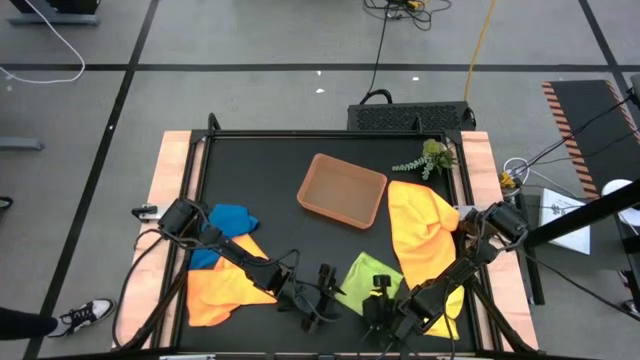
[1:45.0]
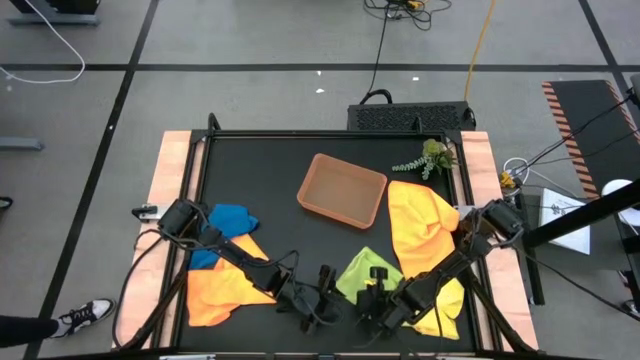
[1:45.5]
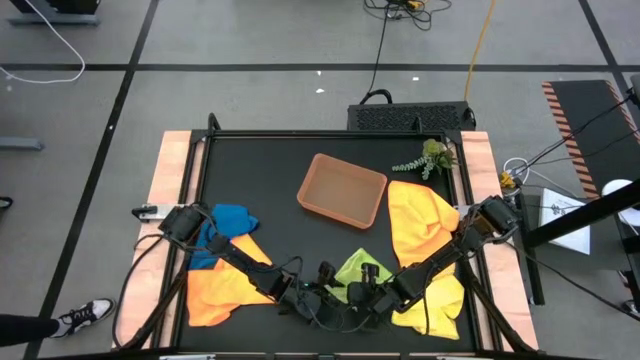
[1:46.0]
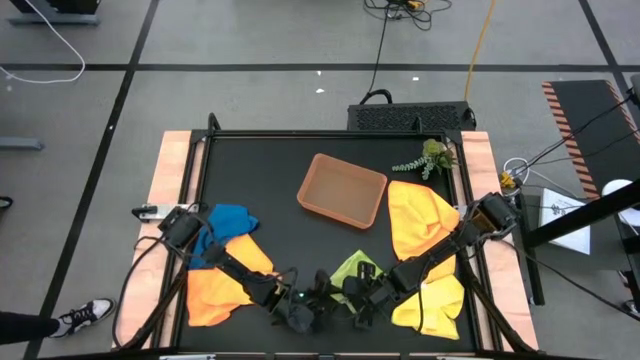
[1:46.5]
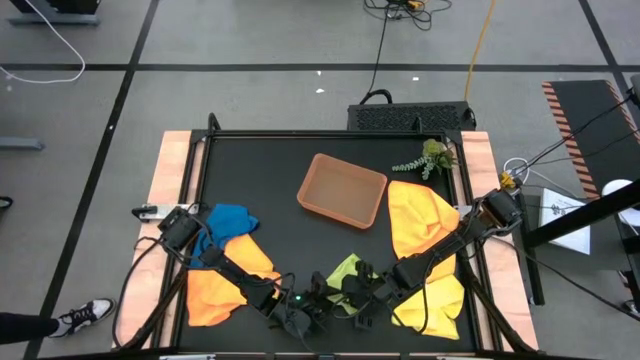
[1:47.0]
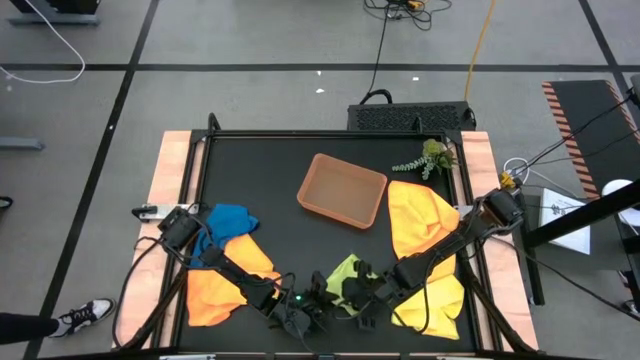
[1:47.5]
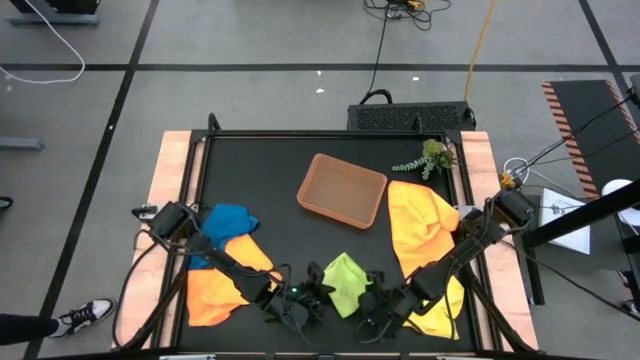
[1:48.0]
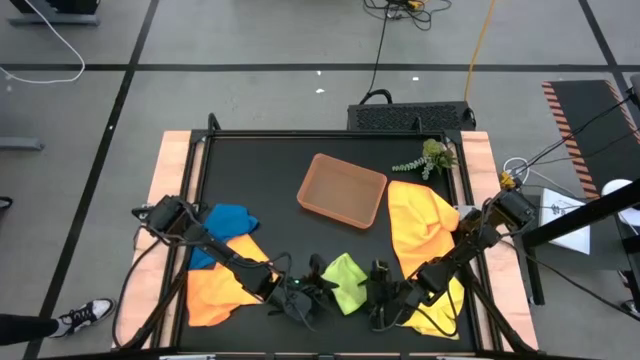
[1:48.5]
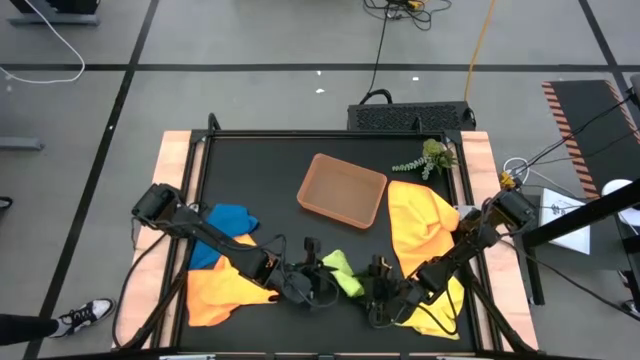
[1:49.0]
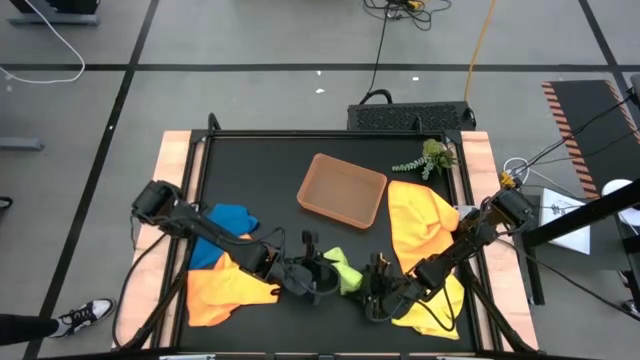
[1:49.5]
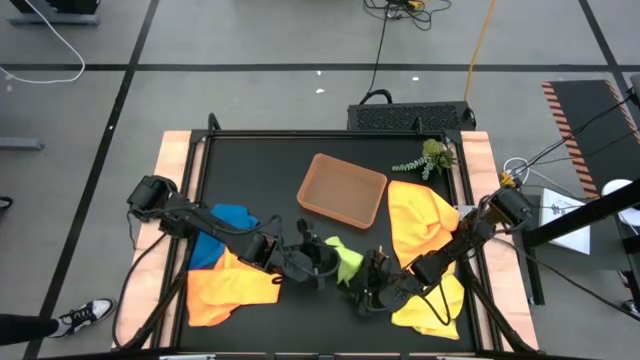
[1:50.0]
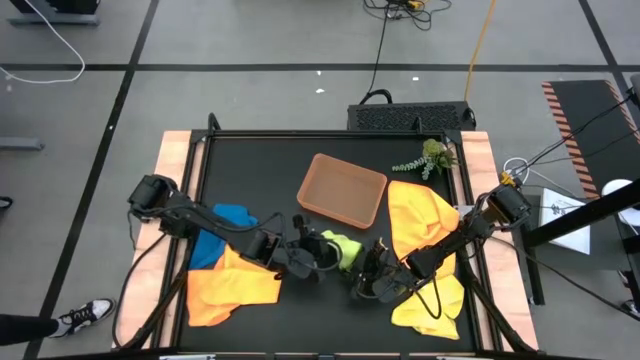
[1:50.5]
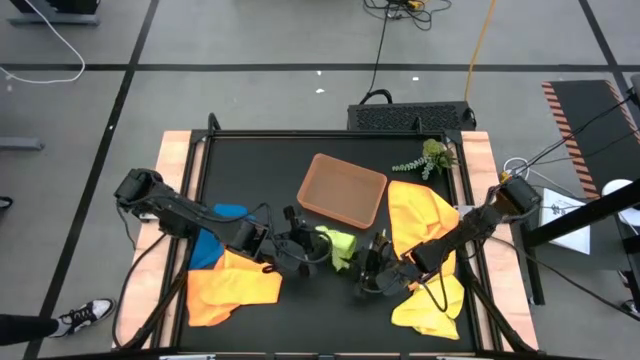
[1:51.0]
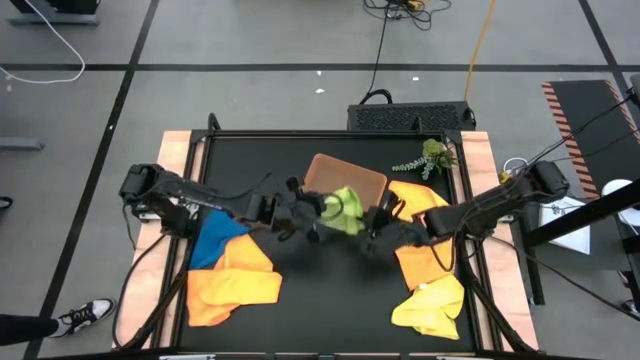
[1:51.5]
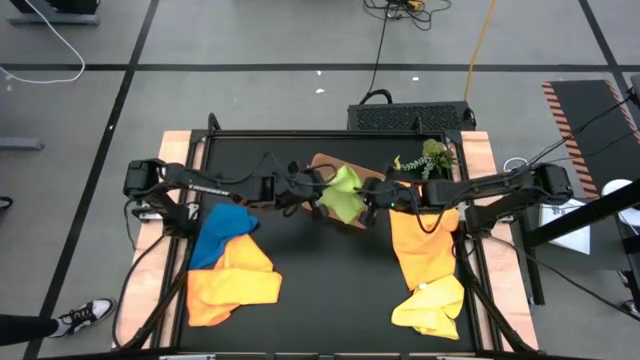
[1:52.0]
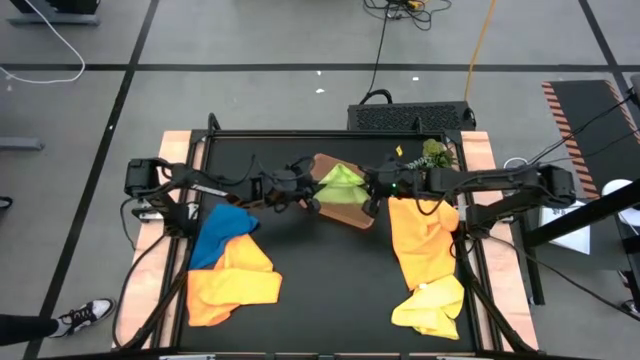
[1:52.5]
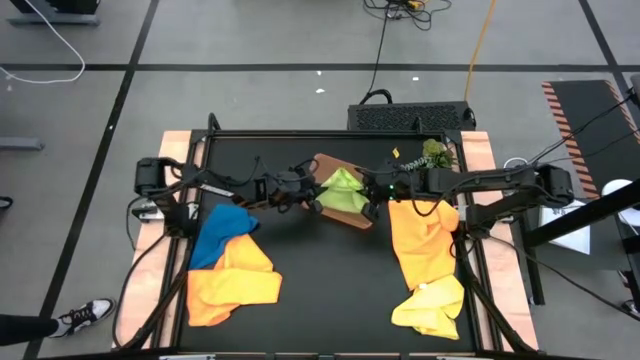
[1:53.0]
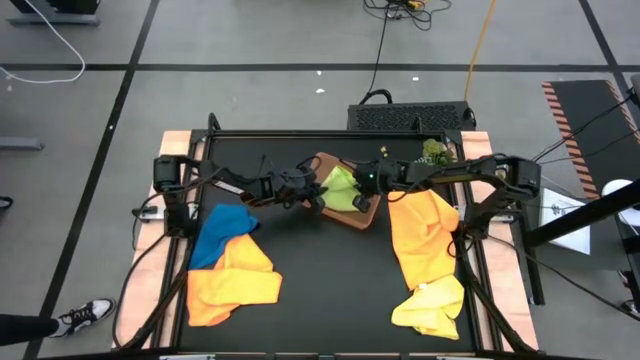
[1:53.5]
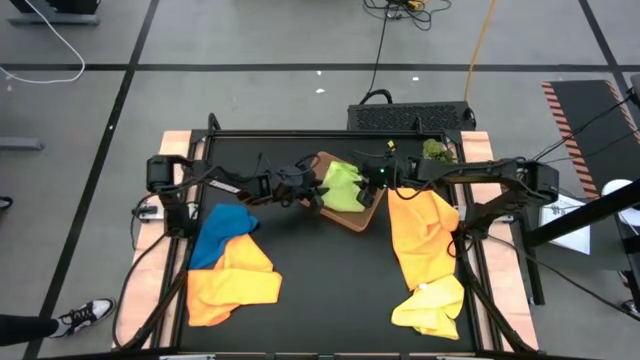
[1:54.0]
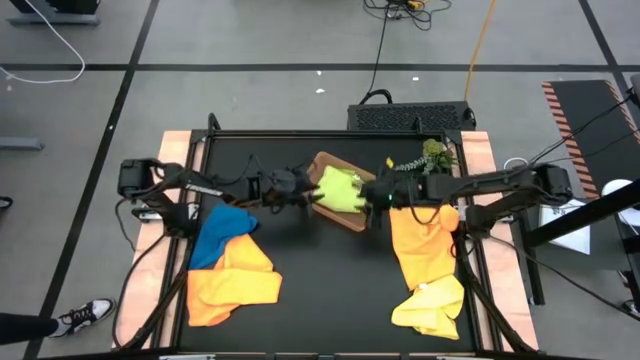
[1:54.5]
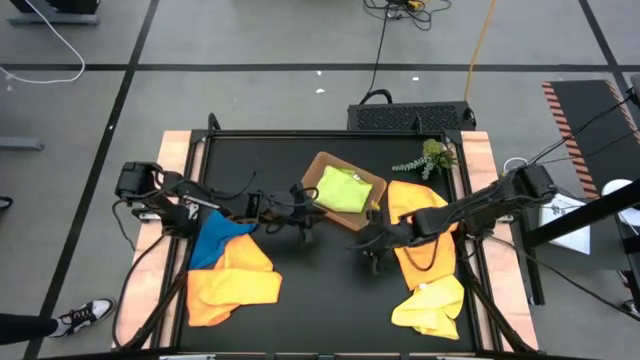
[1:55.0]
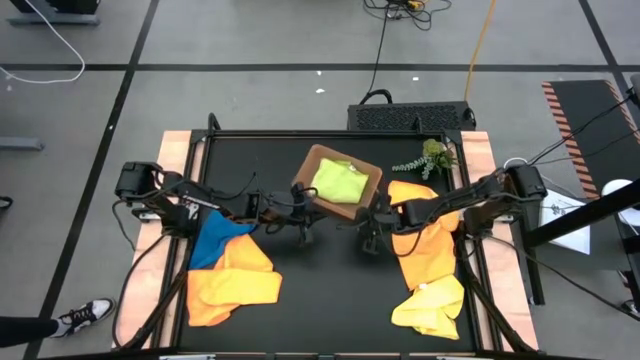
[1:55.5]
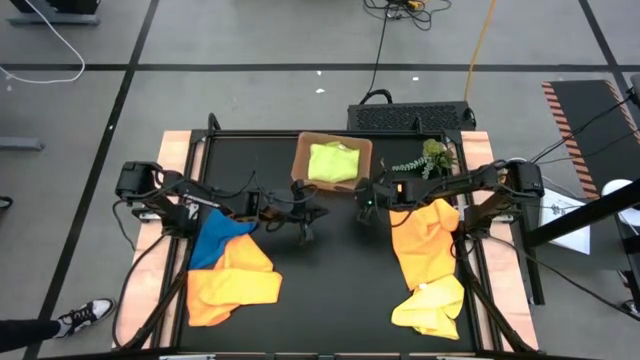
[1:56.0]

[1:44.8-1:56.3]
Task: Fold microfiber towels
Put the green microfiber towel into the orange bin

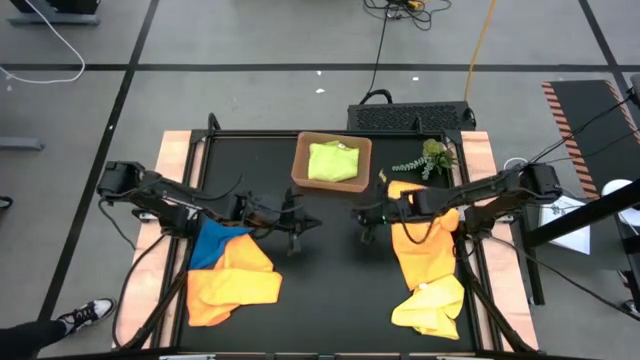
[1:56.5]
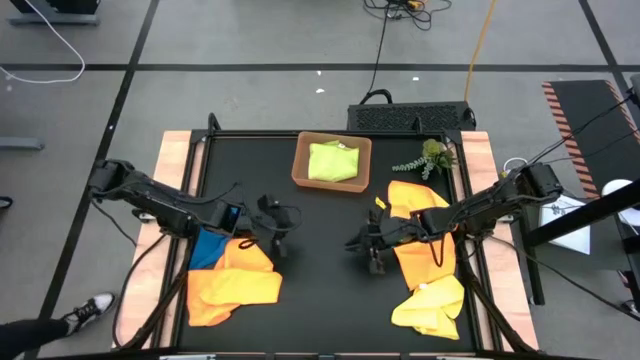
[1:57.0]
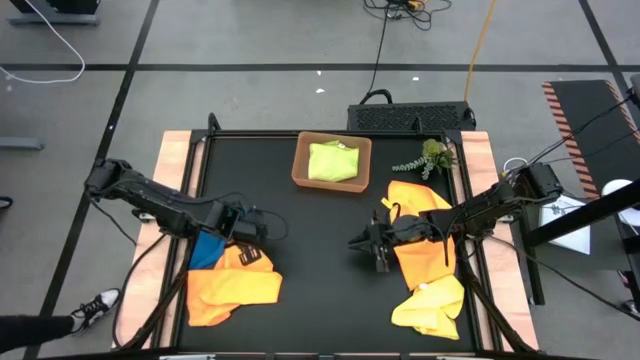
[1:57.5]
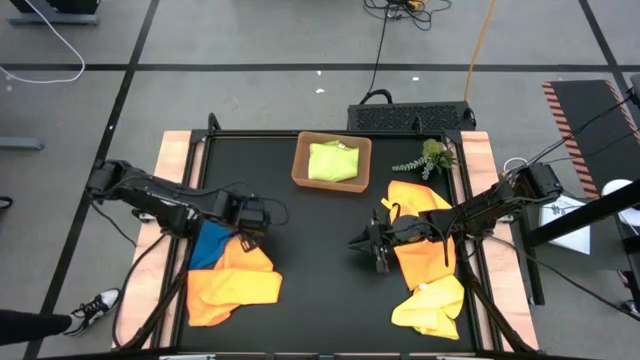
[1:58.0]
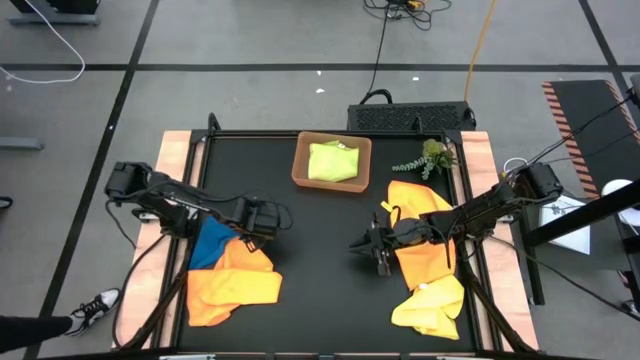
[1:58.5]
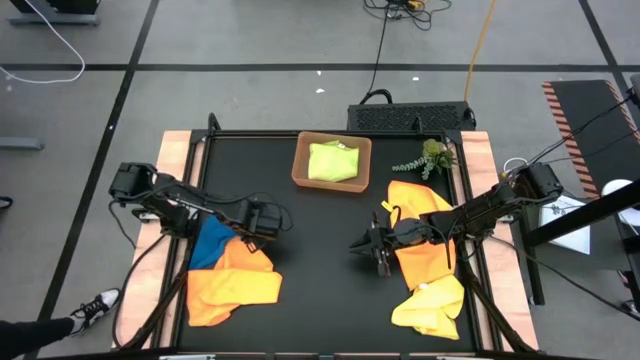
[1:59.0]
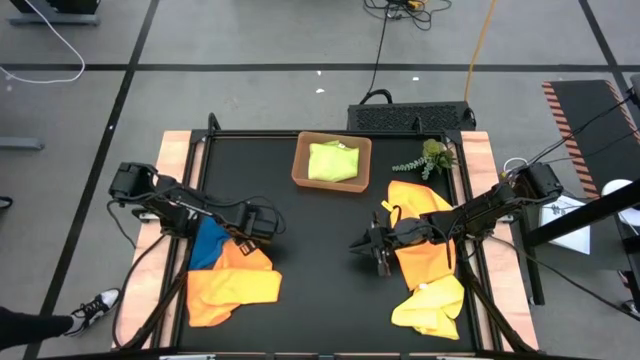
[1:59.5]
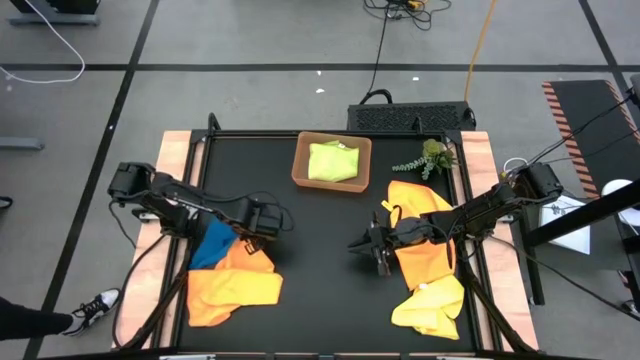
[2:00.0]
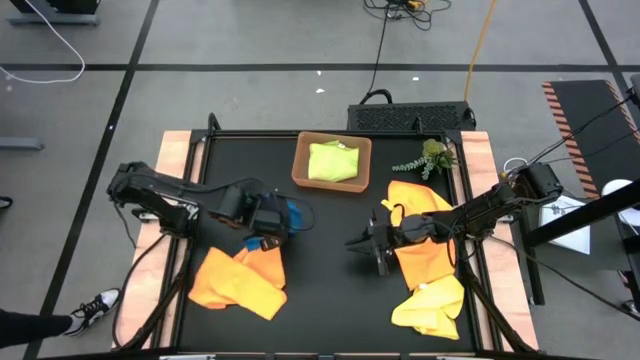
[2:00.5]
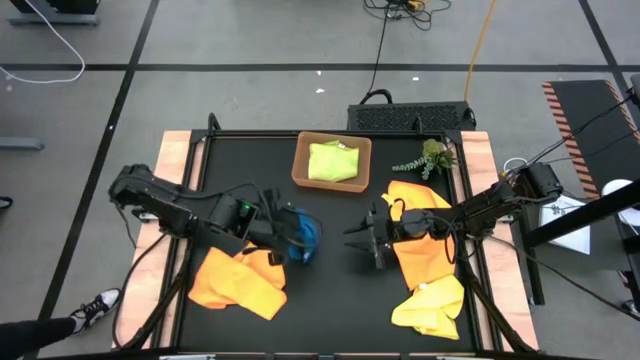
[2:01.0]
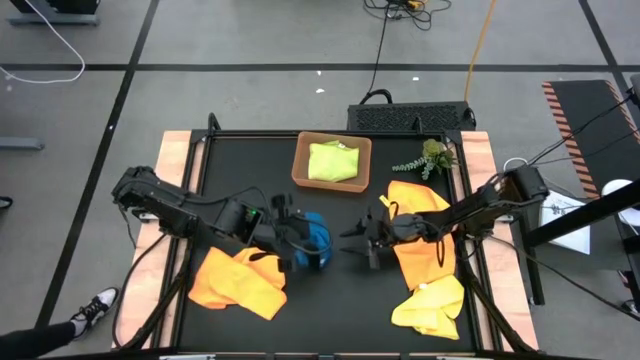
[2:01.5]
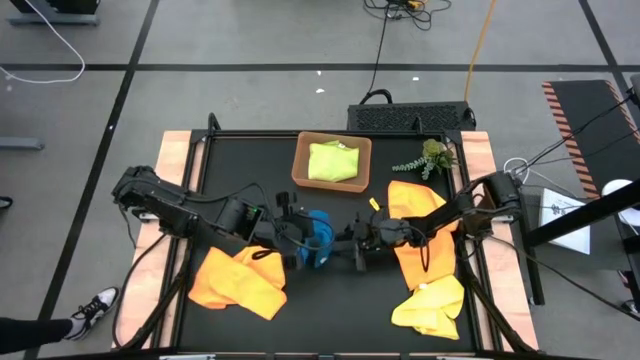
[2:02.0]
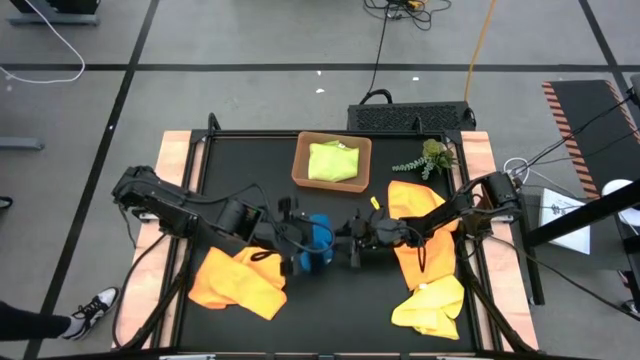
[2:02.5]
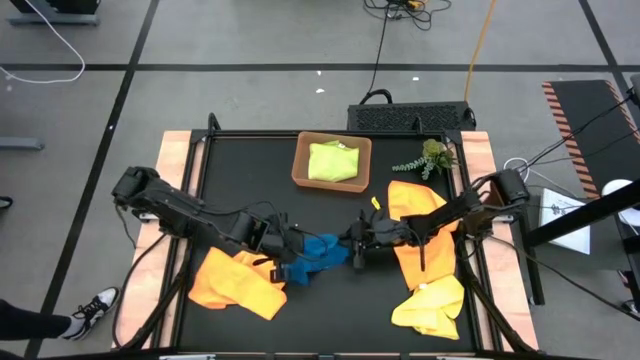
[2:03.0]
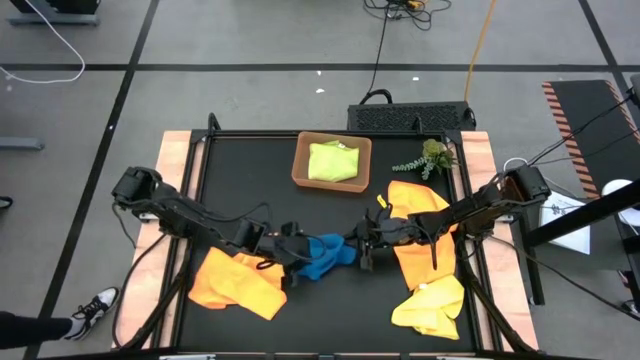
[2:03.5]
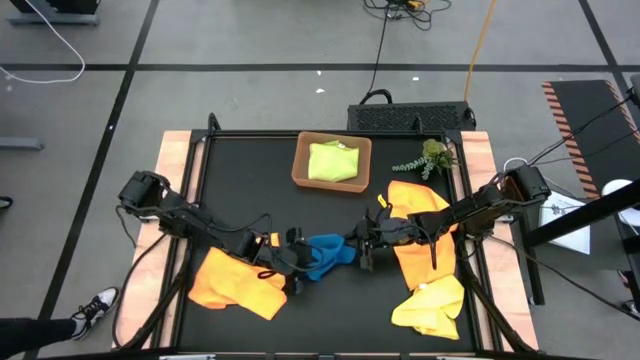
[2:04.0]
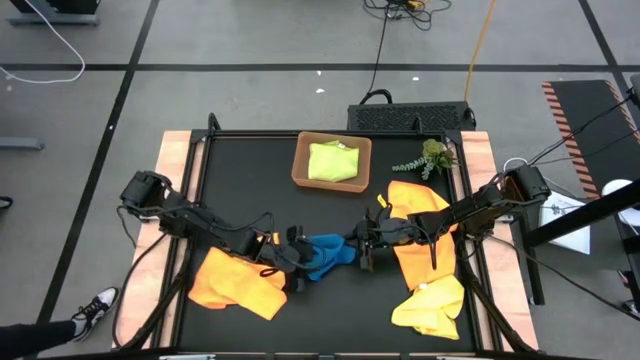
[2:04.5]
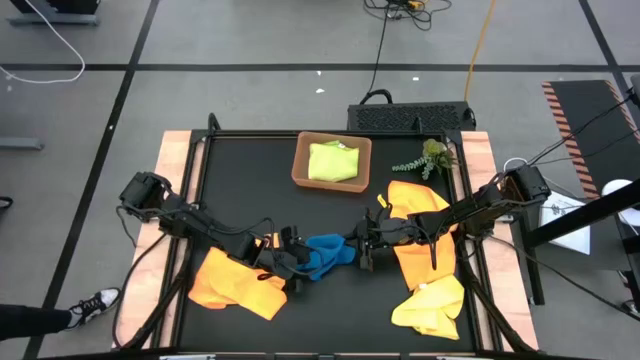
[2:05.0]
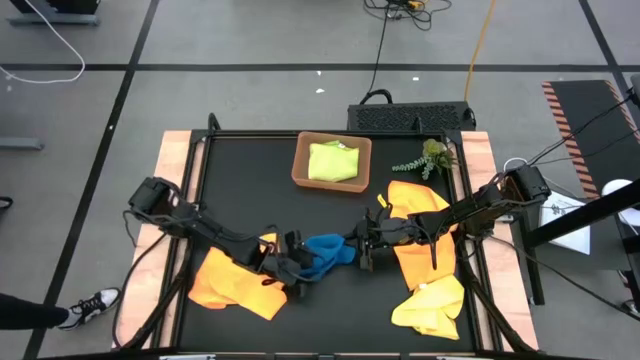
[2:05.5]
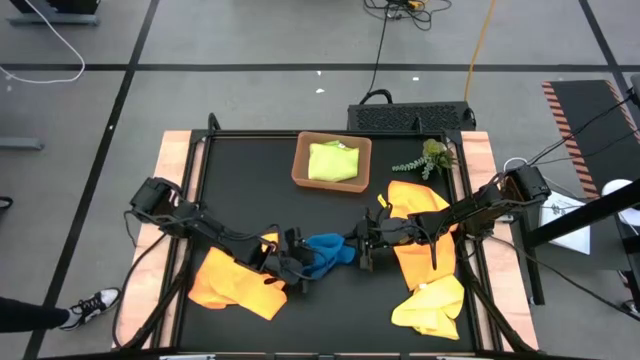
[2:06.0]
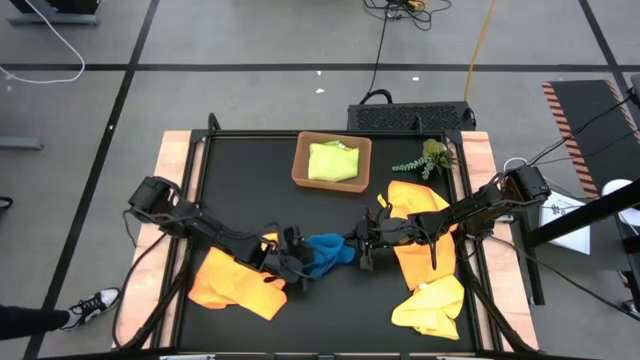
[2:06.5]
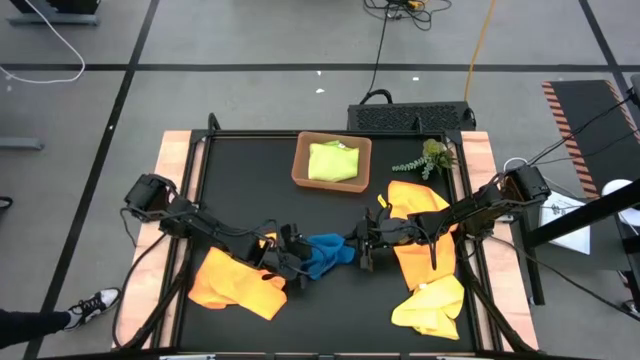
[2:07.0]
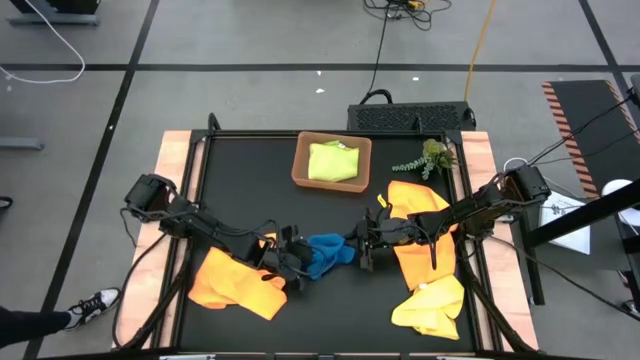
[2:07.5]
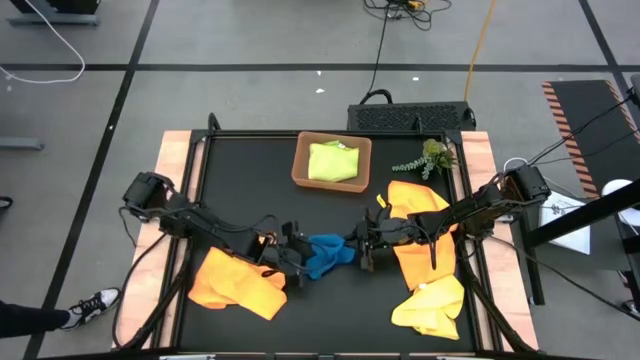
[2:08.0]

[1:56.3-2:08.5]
Fold the blue microfiber towel
